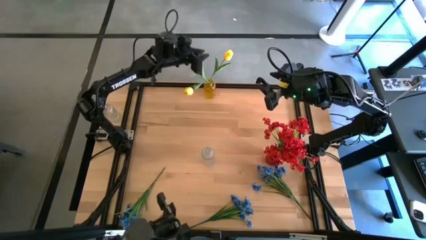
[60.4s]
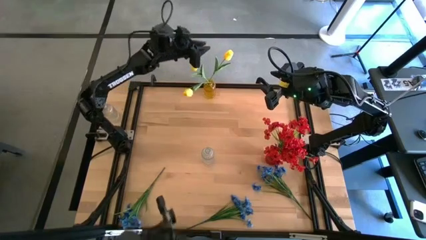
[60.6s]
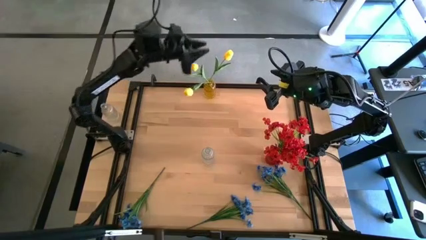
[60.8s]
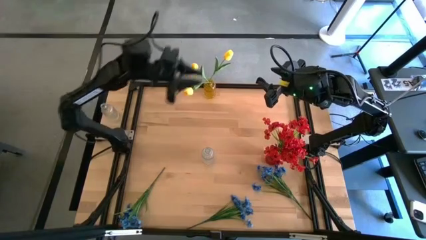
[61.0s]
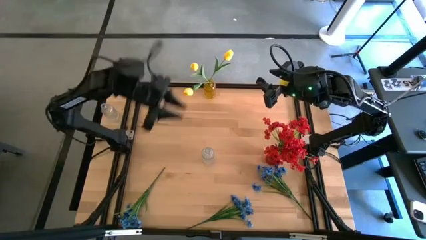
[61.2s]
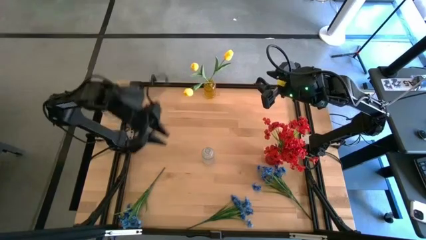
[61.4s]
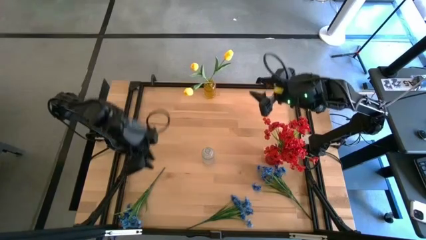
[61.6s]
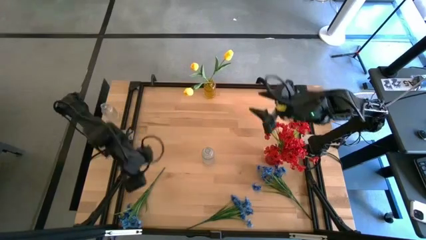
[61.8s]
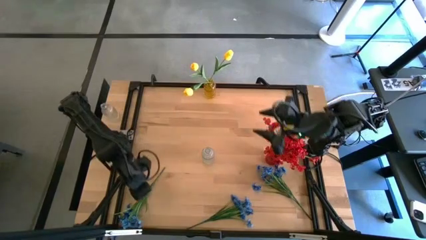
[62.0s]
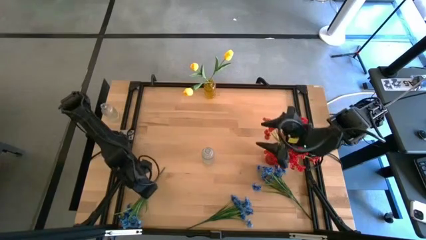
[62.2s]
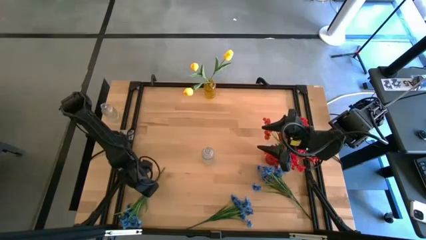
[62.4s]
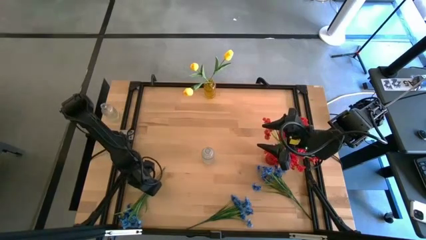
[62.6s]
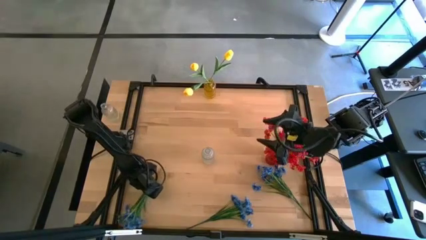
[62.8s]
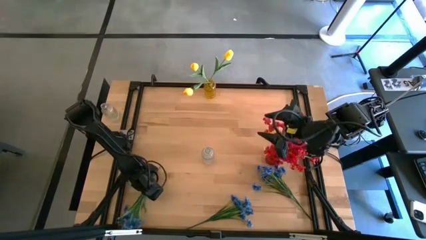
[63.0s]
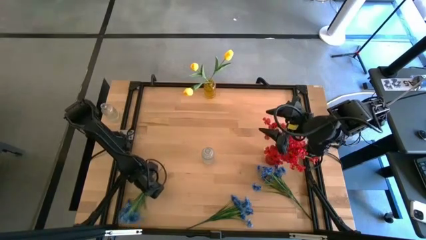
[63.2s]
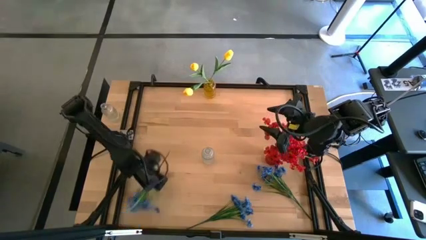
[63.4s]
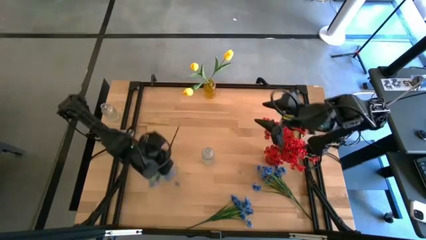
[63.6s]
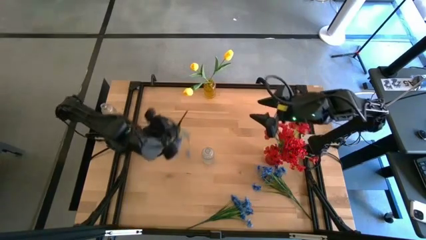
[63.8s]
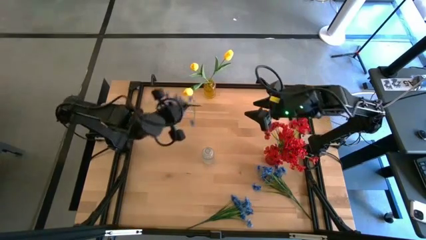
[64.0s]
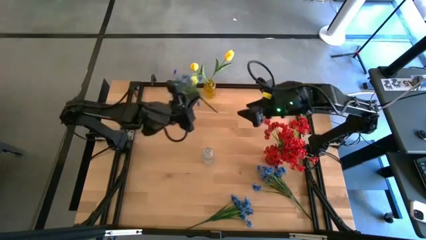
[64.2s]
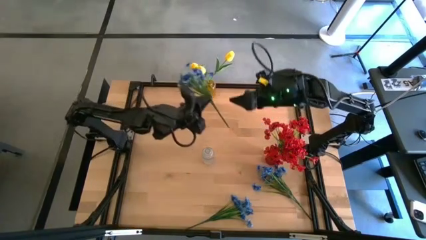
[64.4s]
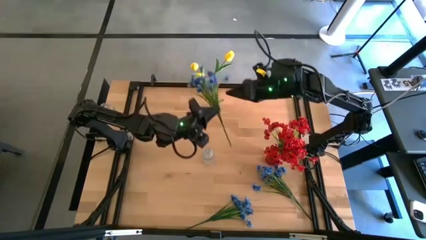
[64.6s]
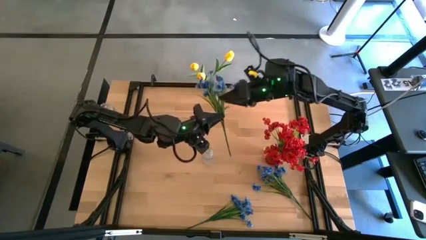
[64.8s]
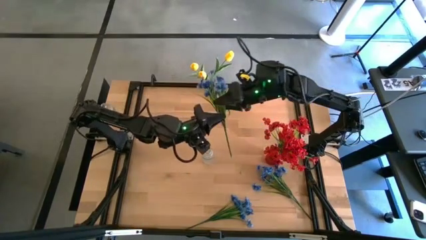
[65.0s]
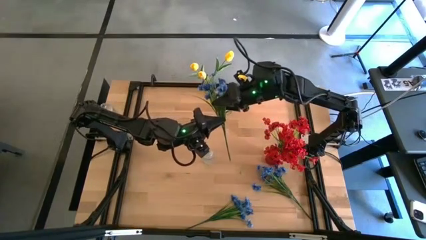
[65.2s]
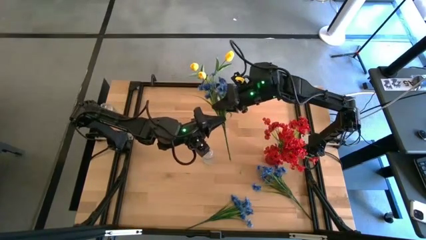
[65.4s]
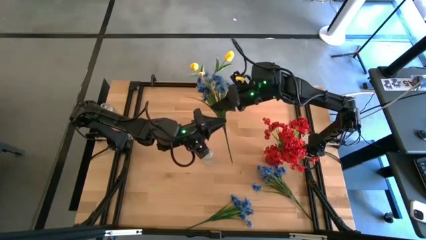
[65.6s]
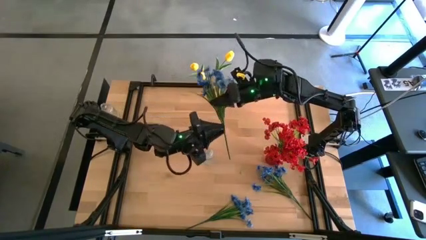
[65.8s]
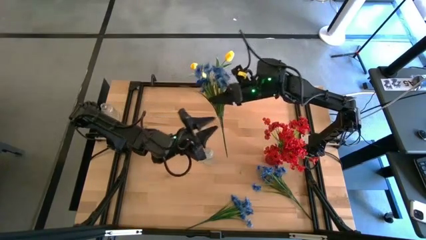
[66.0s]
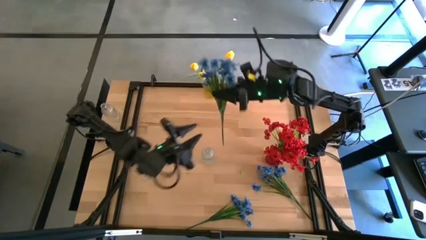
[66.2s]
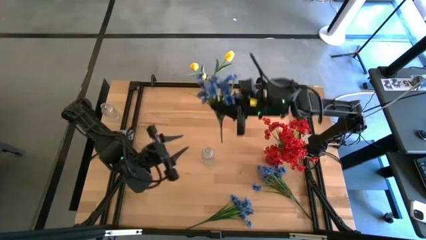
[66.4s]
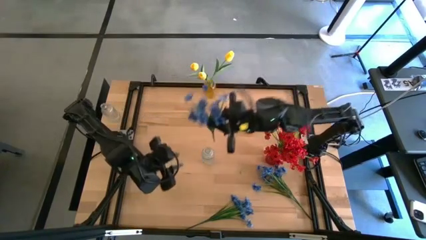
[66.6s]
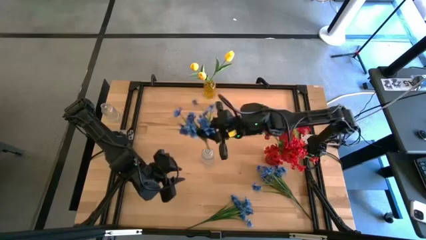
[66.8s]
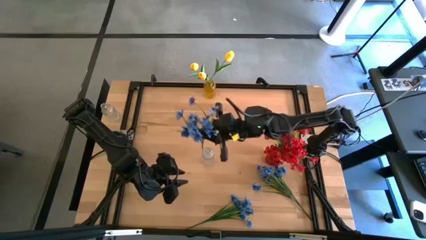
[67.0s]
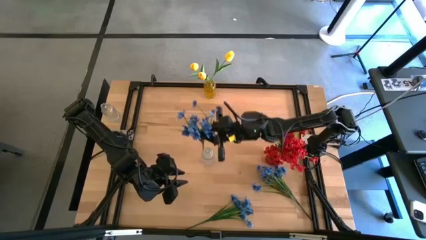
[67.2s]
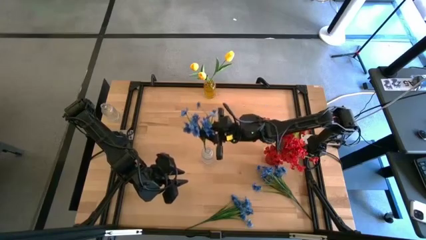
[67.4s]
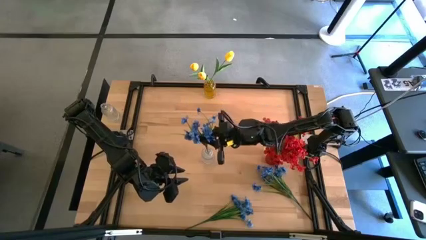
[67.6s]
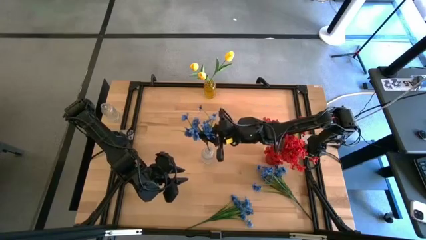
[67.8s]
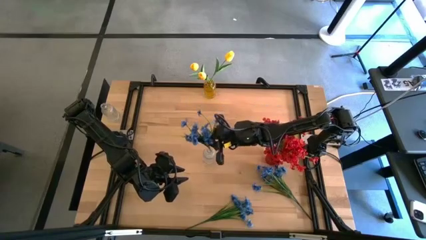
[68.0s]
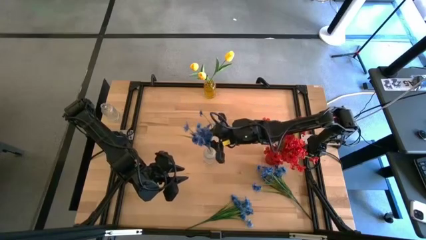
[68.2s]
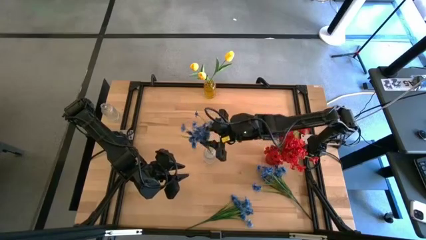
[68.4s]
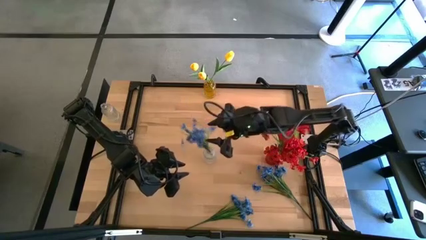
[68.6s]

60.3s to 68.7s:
Task: Sort flowers into vase by color
Put the left blue flowers into the transparent vase

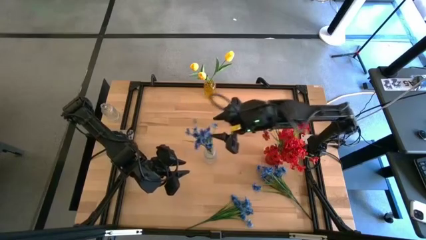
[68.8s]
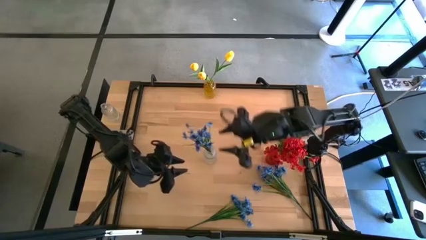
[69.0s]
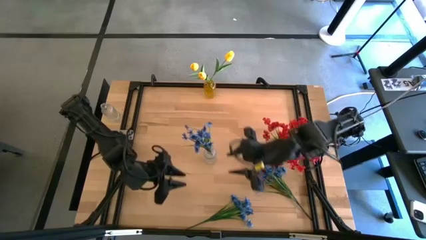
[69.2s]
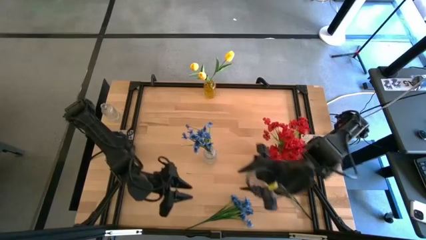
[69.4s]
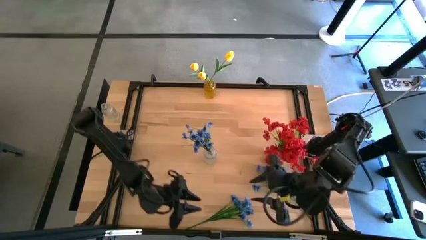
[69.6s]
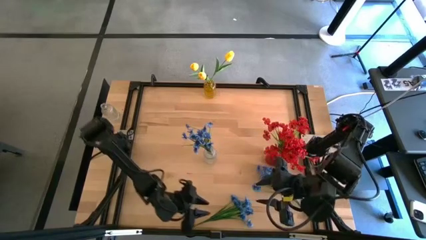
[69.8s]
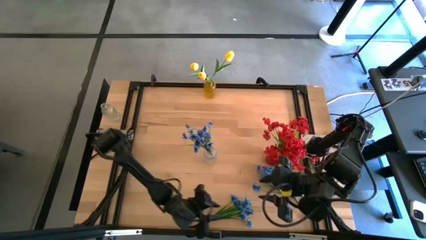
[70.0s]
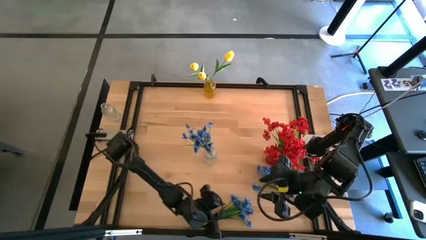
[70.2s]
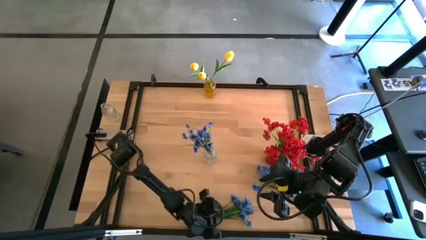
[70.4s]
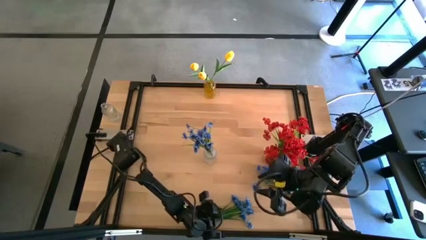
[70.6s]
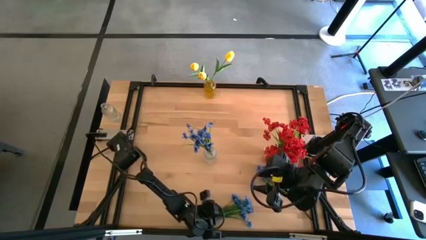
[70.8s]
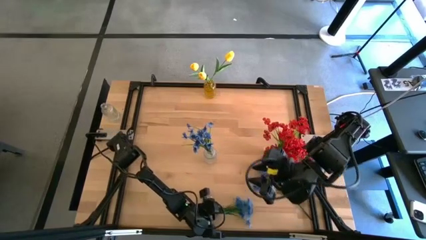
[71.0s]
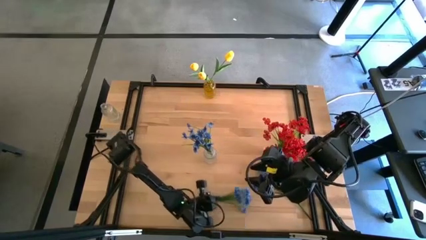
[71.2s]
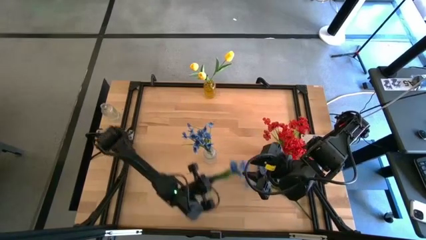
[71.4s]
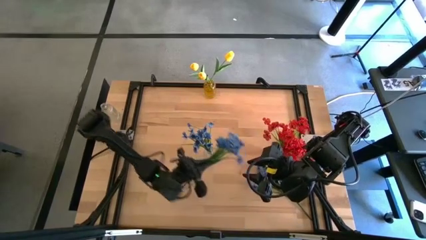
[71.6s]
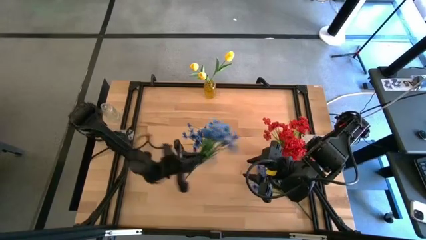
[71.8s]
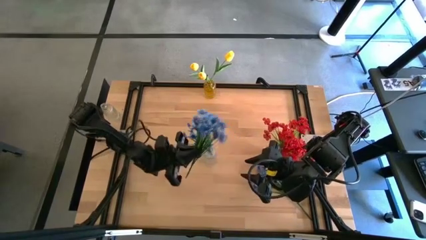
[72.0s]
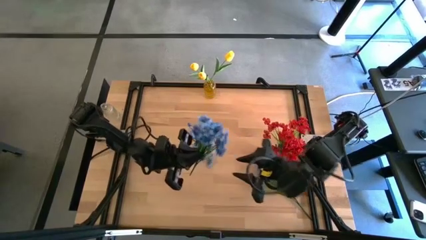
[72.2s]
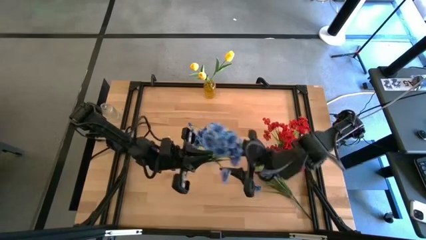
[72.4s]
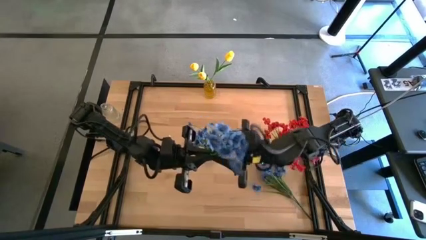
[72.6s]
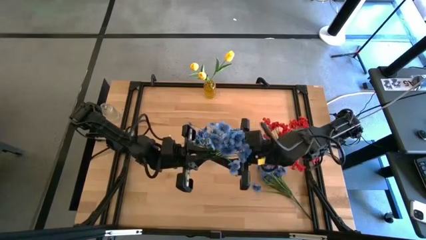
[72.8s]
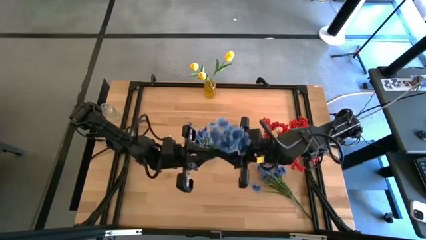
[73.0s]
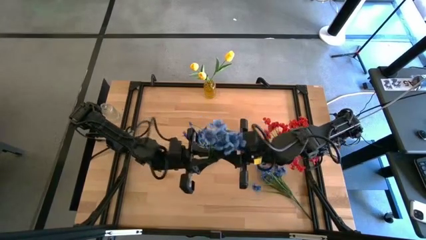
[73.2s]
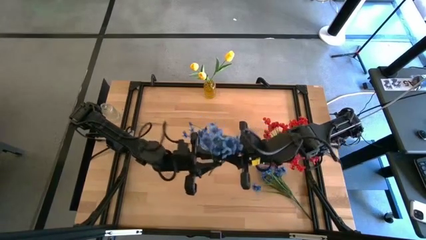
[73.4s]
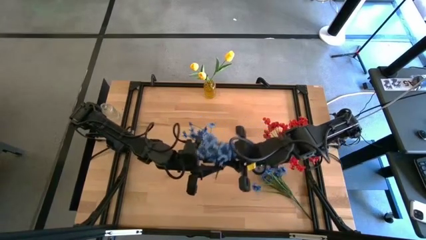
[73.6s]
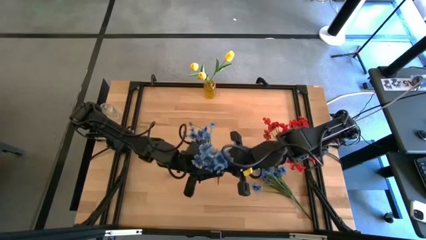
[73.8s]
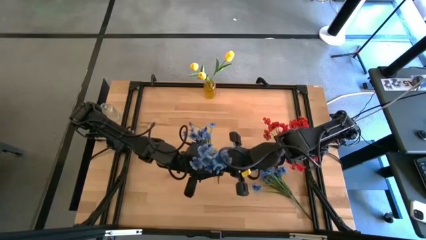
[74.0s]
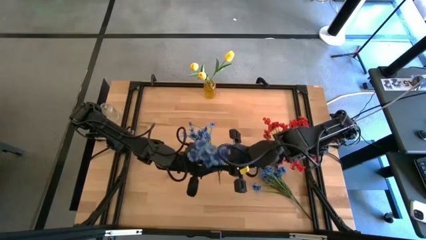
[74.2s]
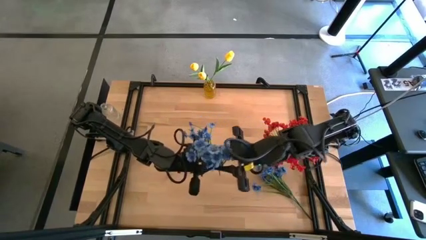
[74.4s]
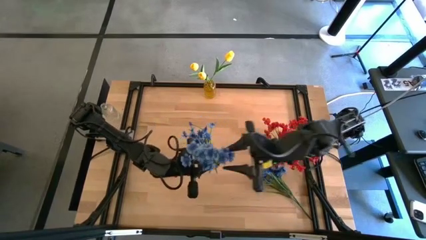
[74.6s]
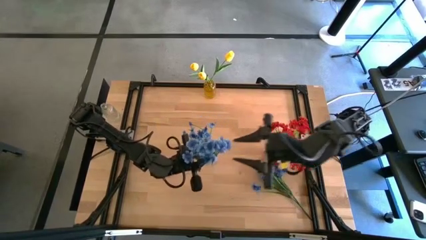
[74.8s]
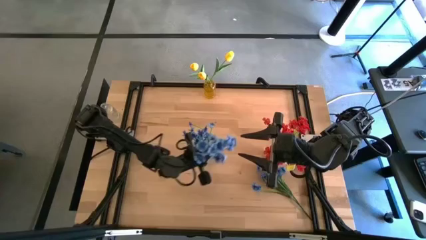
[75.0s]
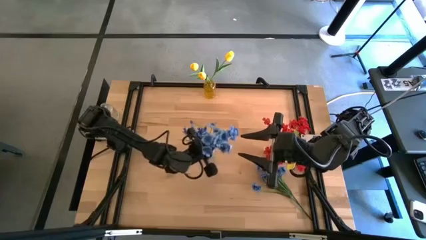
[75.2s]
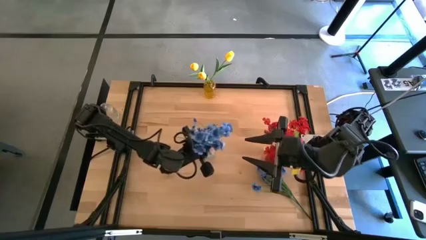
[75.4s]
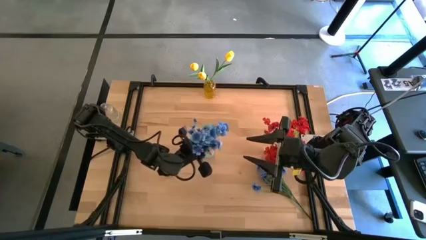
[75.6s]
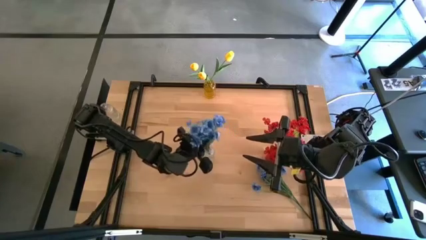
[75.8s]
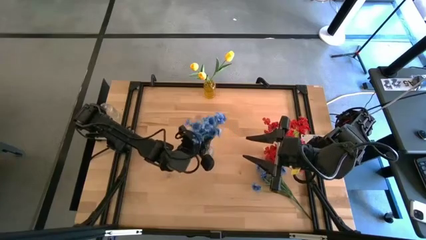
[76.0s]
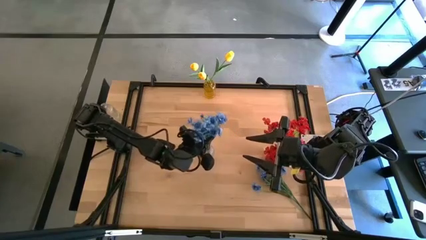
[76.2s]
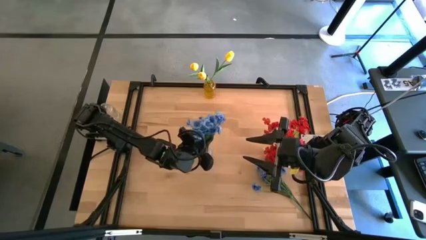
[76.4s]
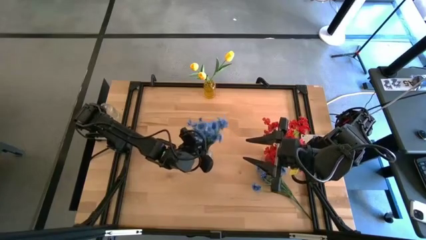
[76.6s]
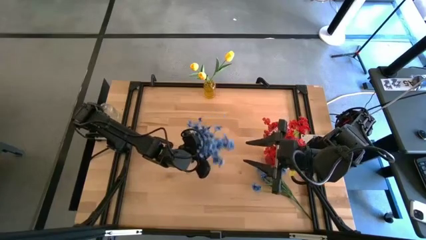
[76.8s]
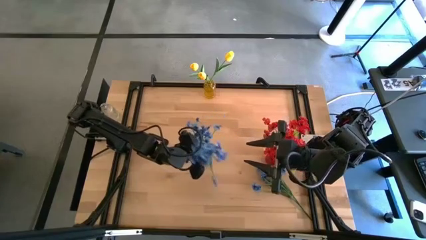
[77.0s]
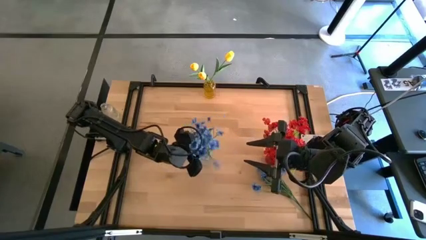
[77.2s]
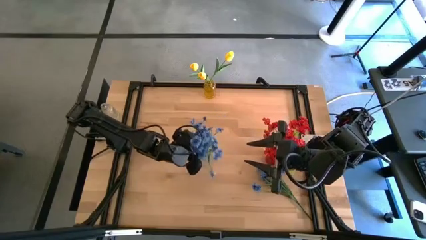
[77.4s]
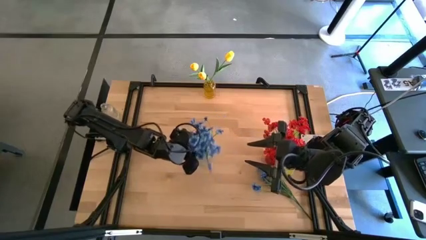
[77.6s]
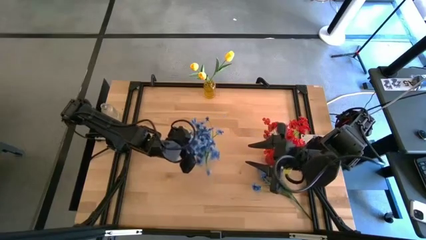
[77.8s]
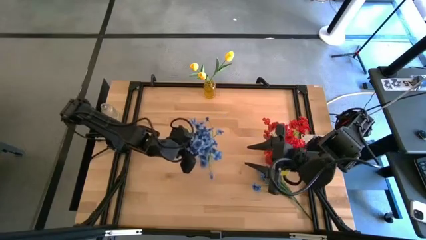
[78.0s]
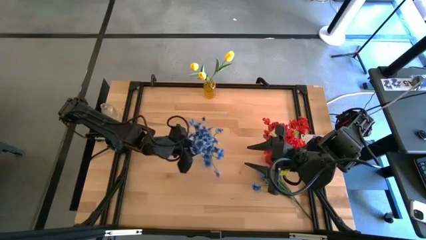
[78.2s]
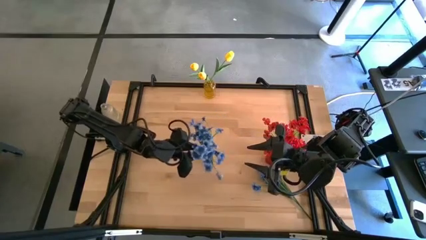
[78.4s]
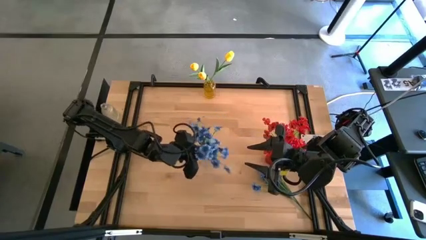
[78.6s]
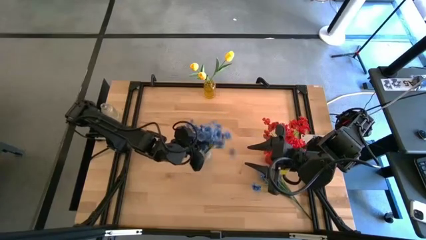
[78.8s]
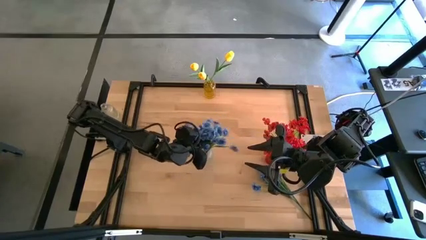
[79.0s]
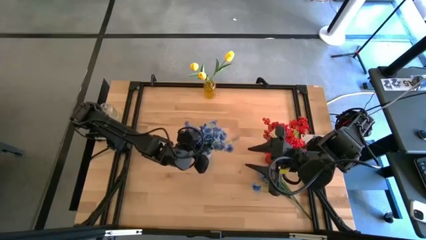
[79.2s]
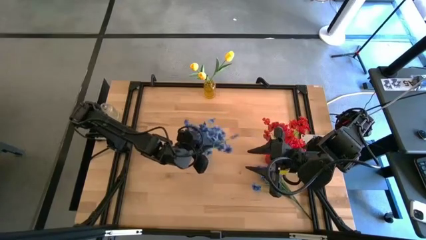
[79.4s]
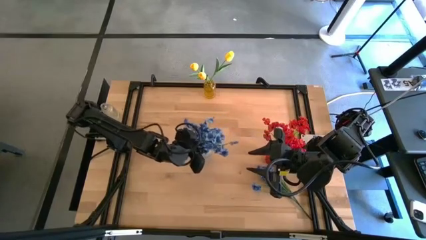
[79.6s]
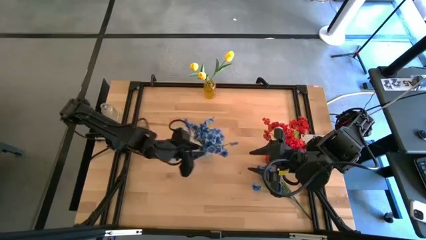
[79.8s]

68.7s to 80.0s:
Put the left blue flowers into the transparent vase
